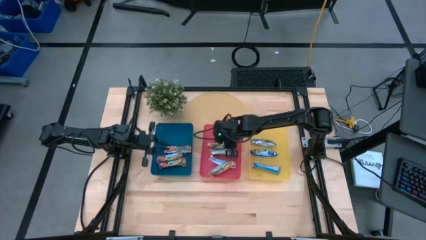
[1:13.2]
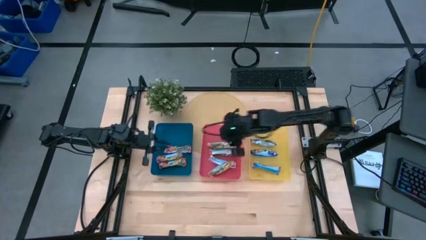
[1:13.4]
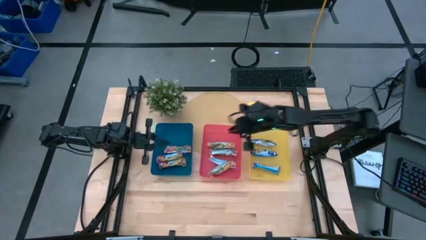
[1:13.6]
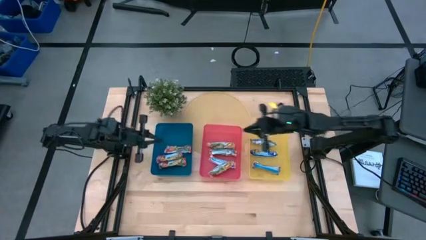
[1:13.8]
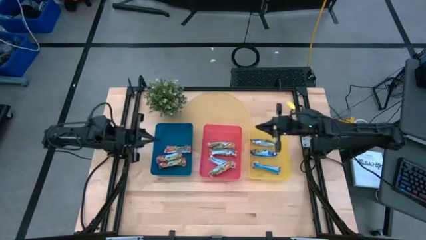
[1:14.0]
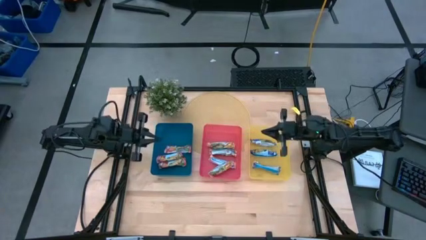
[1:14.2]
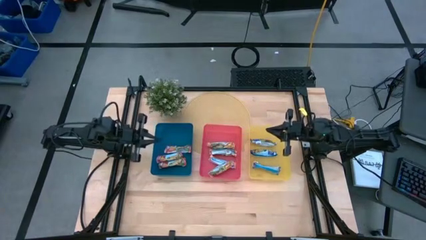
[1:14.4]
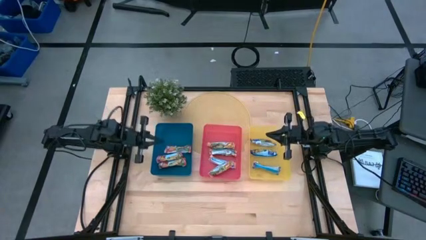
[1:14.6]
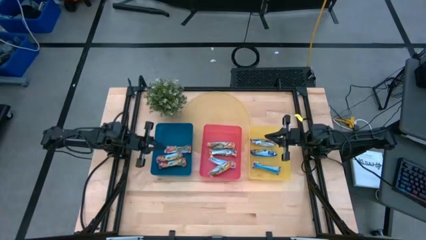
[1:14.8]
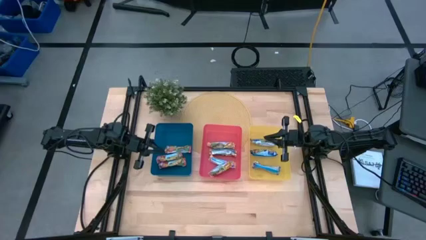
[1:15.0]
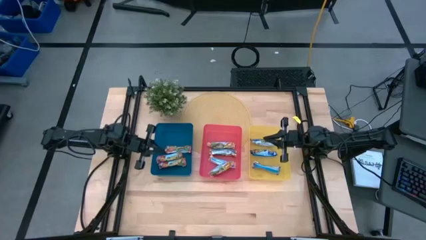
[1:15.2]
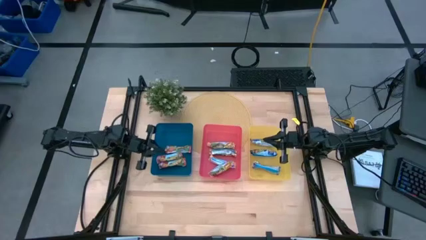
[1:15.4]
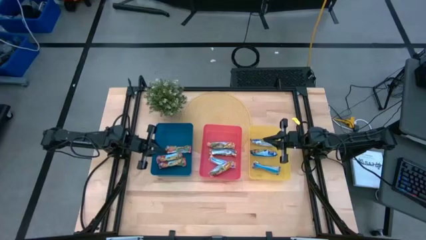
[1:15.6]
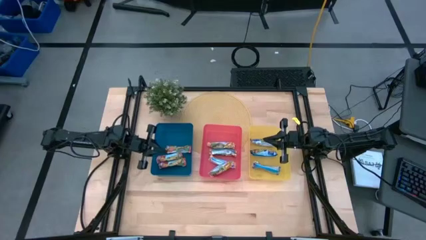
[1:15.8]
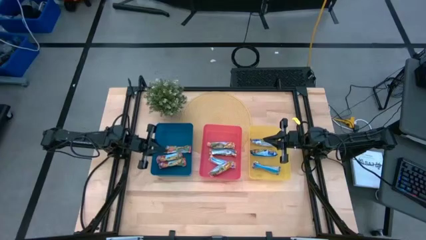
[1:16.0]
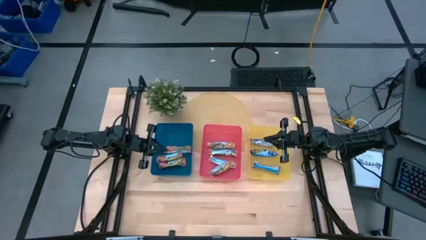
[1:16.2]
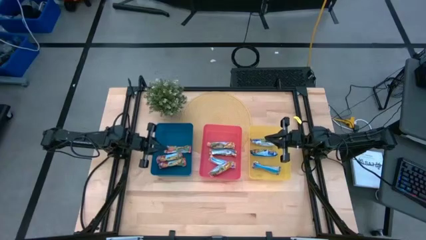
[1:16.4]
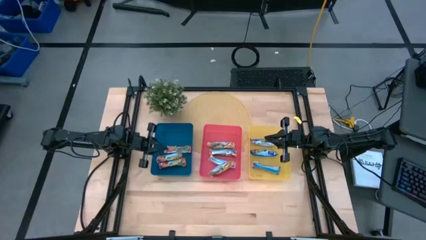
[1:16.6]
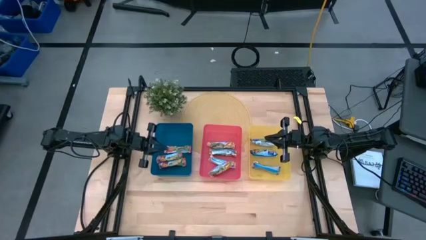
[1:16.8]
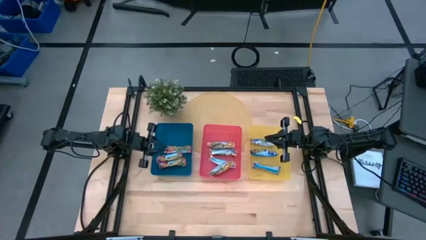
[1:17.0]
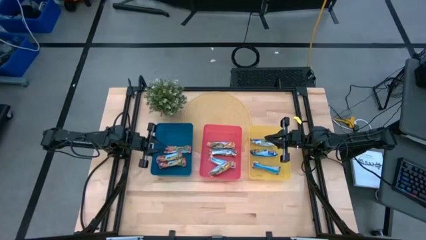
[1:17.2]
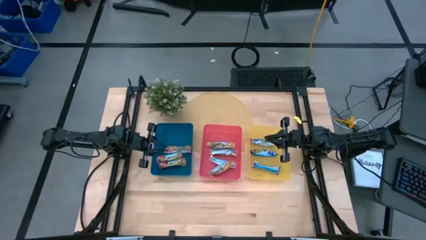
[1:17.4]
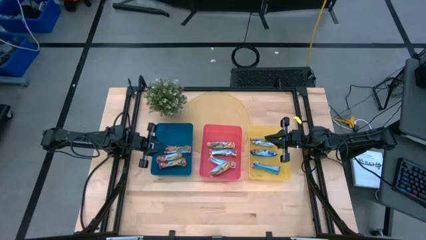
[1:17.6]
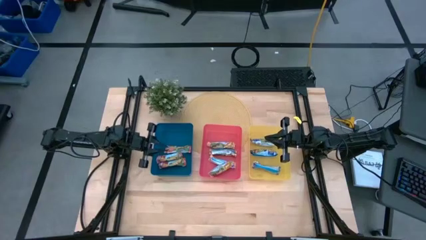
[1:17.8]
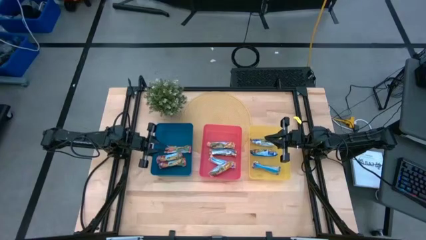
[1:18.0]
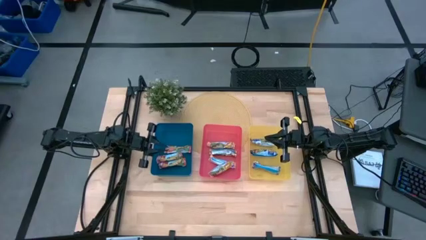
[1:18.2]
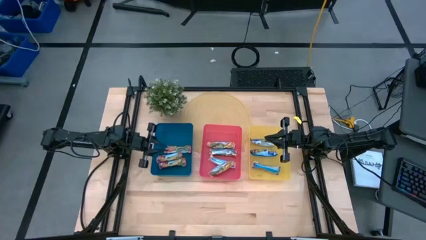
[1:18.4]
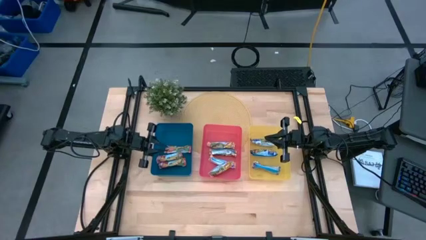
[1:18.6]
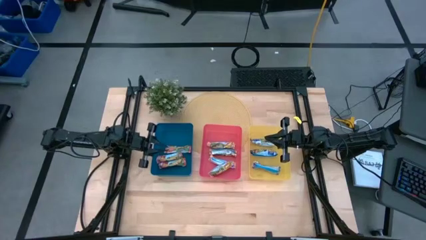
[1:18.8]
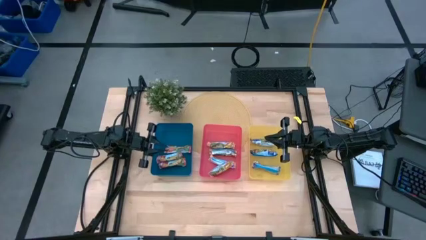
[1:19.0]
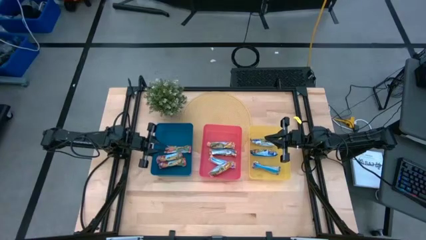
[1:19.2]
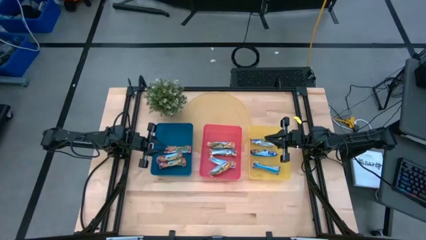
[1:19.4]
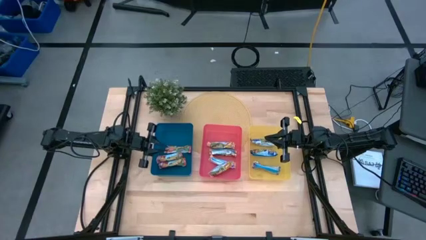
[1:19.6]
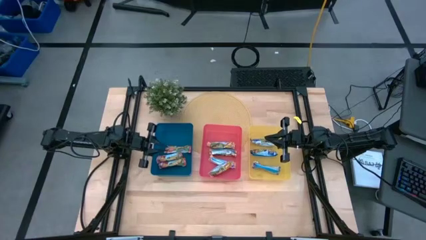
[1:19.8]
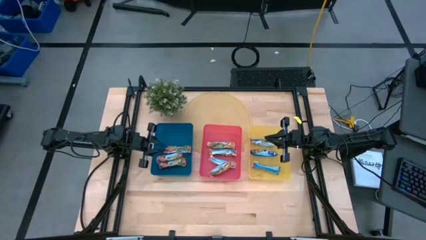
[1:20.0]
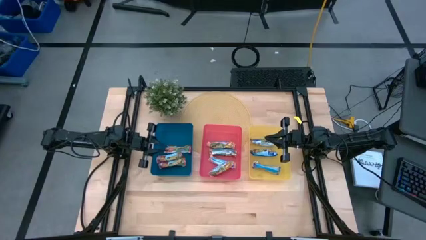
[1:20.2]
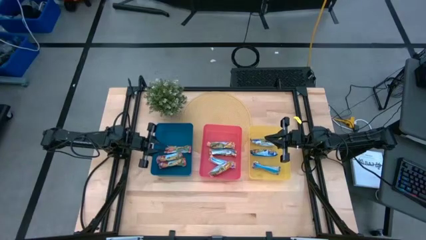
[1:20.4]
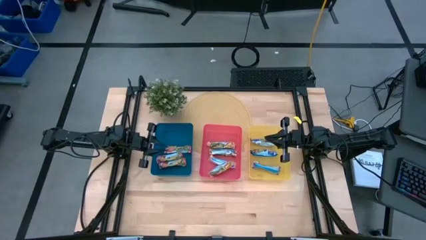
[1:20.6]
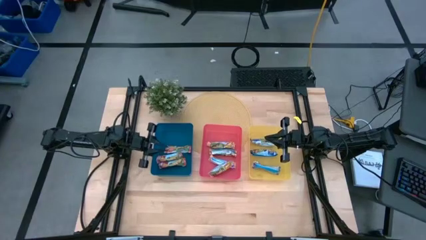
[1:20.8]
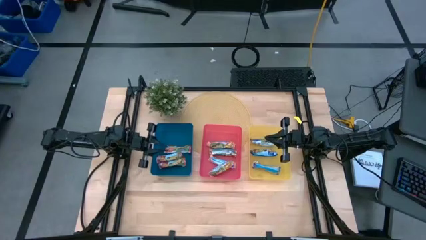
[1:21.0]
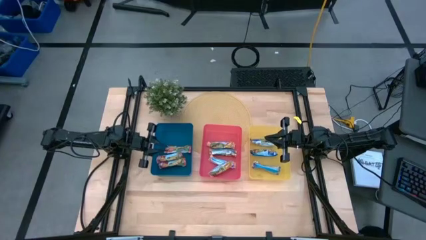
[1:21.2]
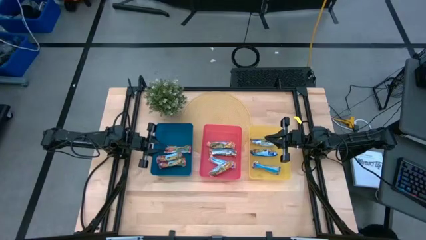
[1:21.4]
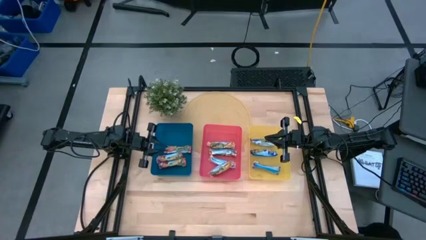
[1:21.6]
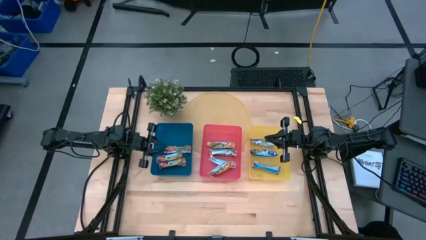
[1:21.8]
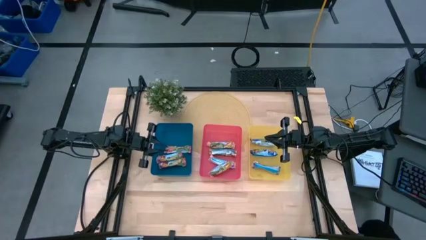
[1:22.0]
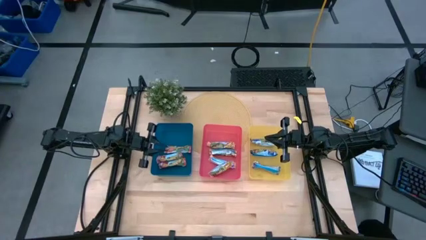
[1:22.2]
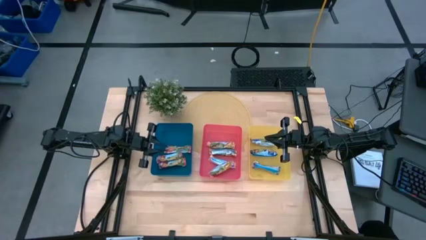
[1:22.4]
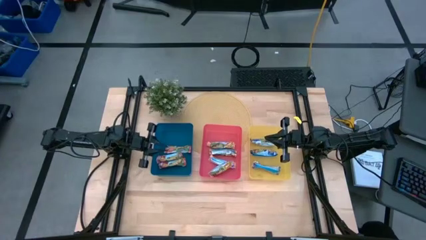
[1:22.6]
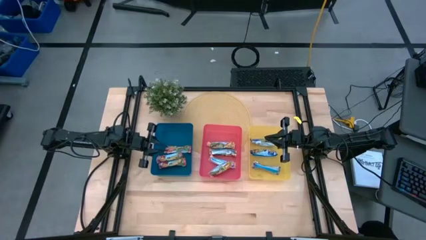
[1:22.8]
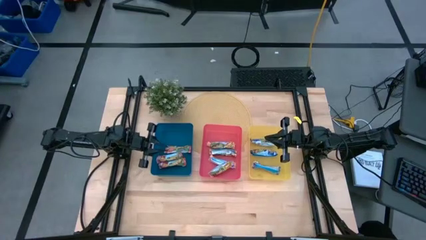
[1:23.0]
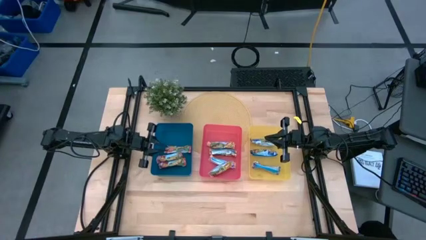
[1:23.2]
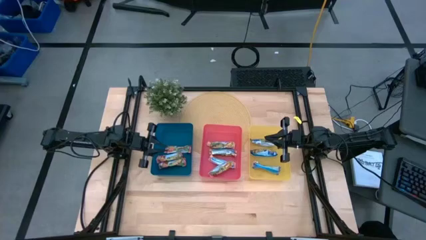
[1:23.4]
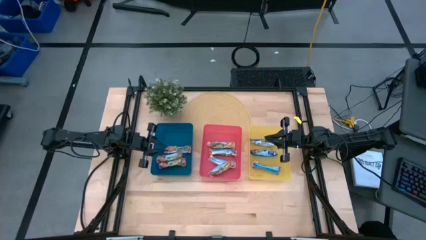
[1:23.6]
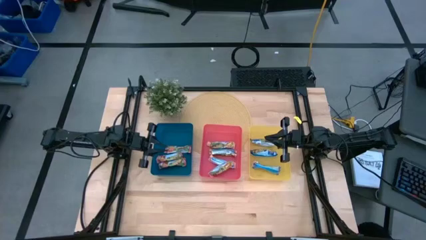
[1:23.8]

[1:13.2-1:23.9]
Task: Pick and place Granola Bars by type
Return to Home Position
